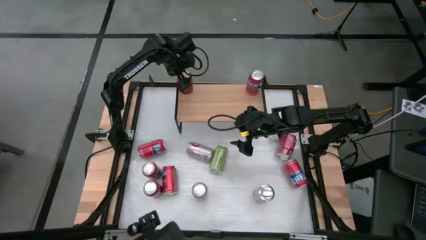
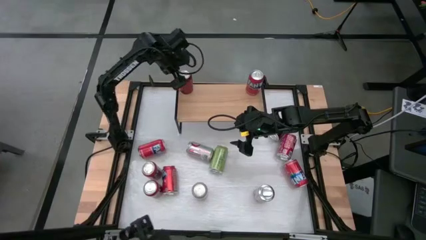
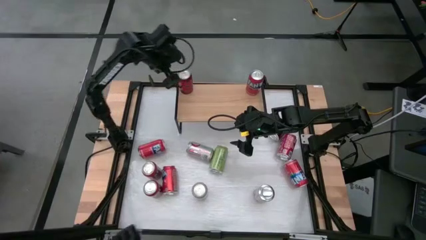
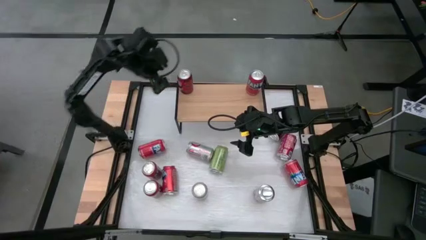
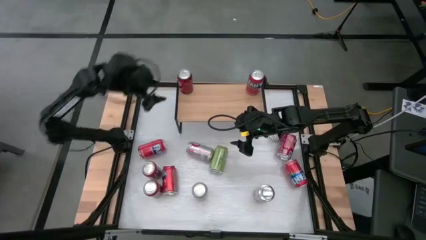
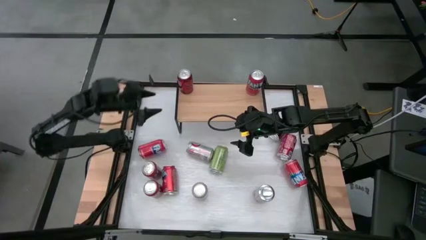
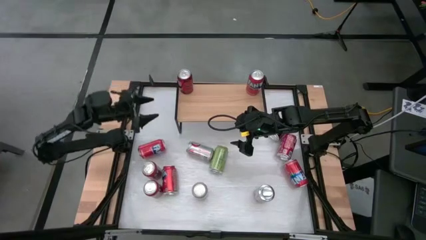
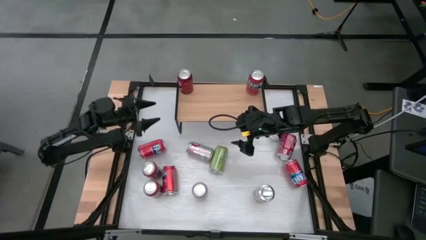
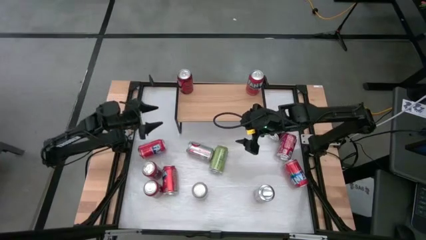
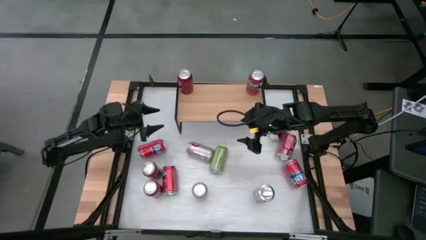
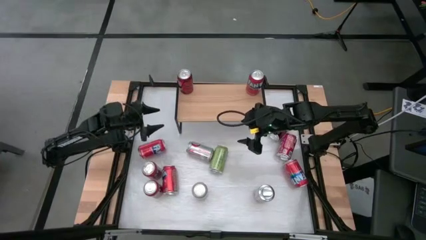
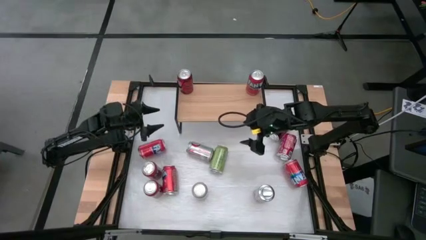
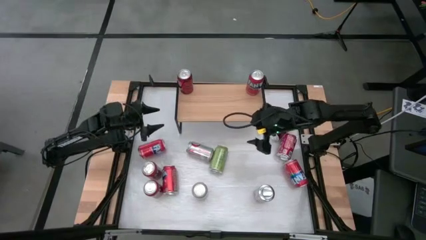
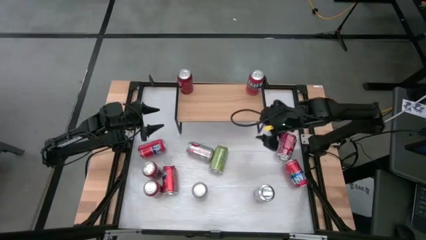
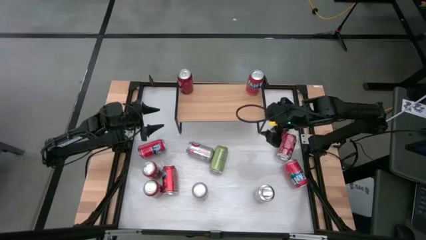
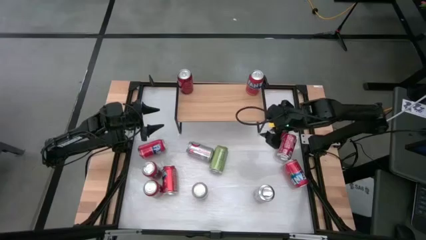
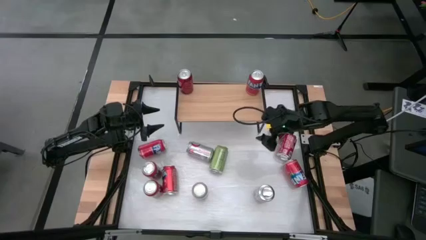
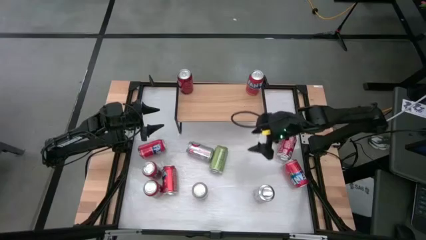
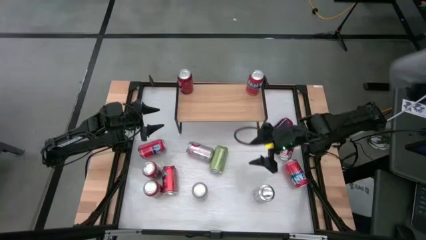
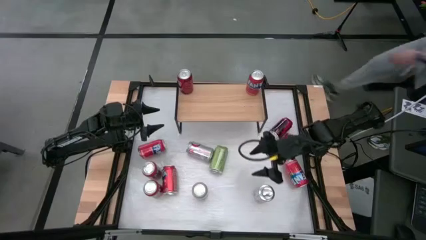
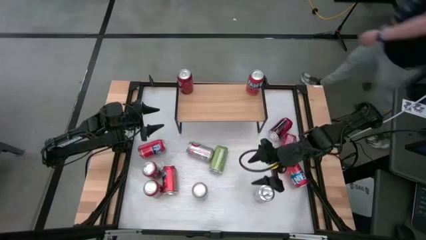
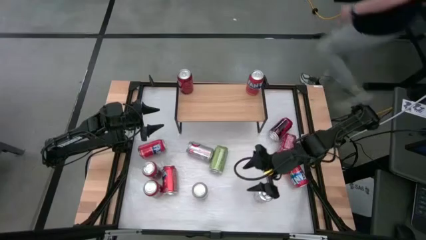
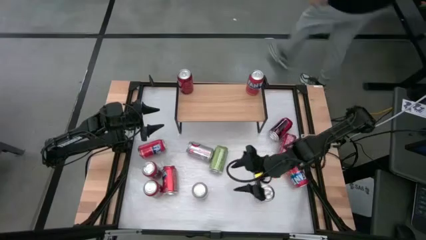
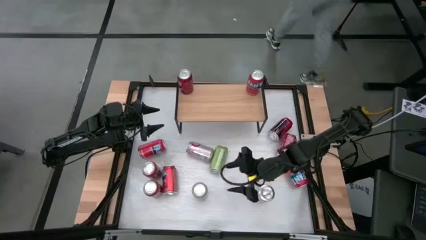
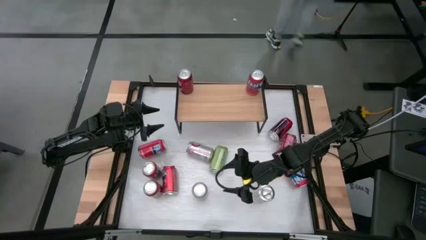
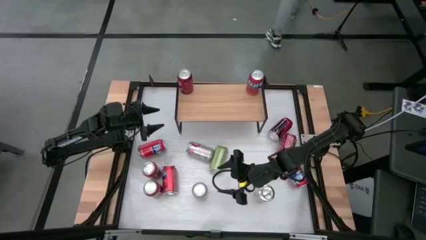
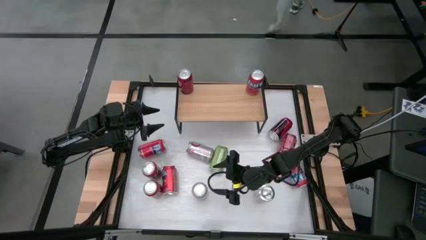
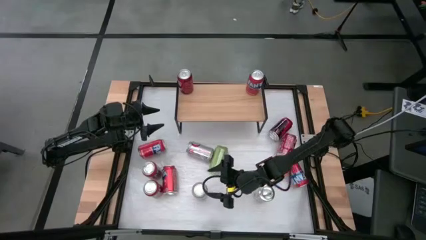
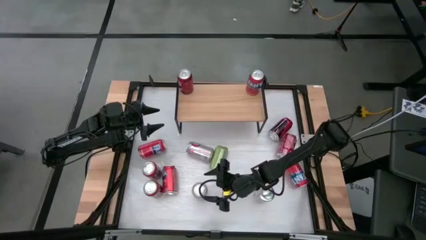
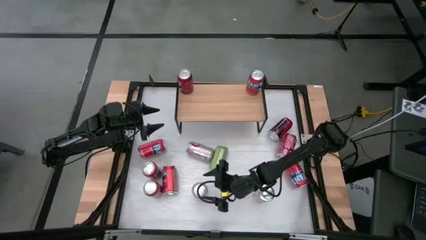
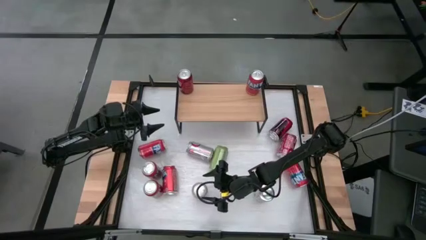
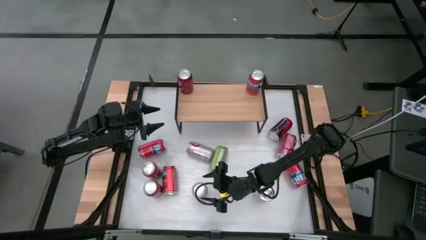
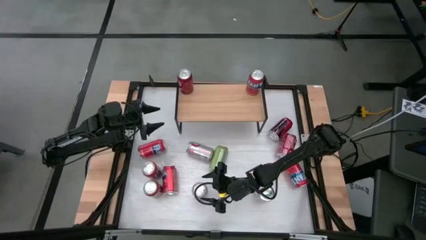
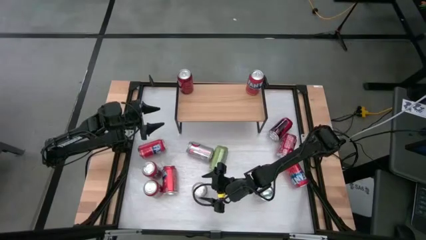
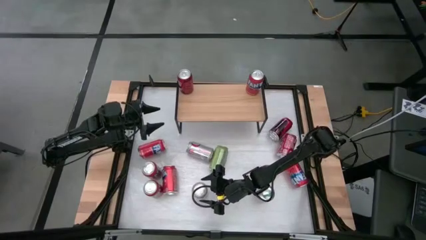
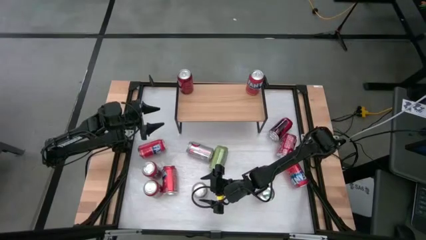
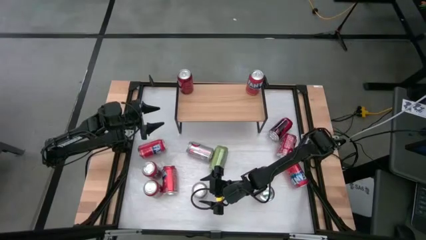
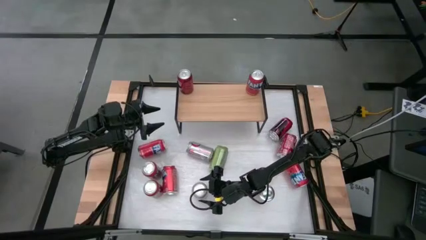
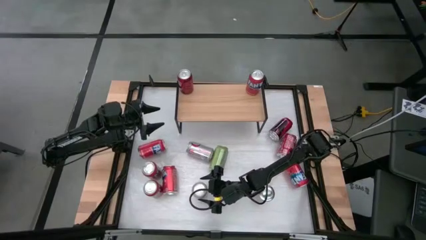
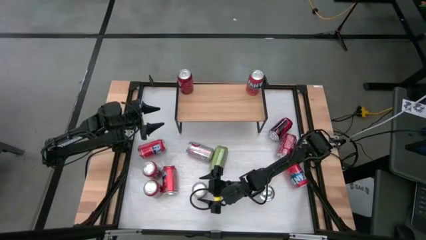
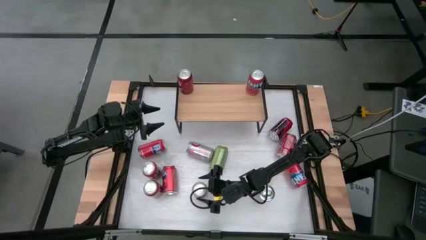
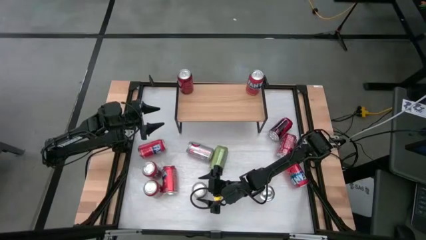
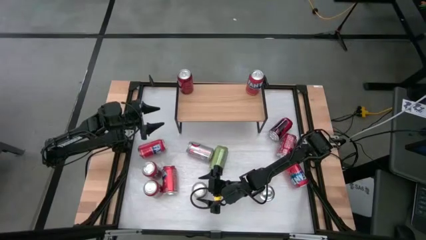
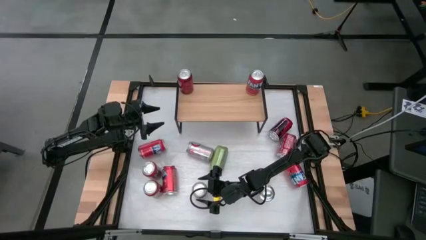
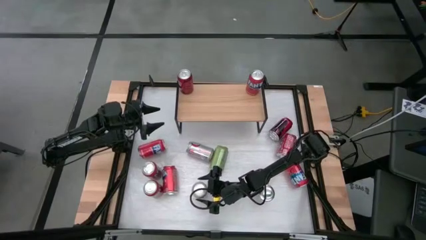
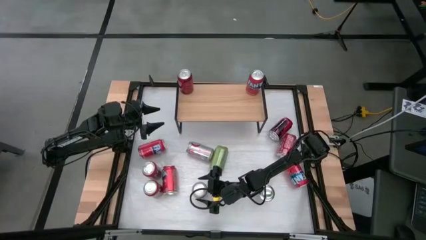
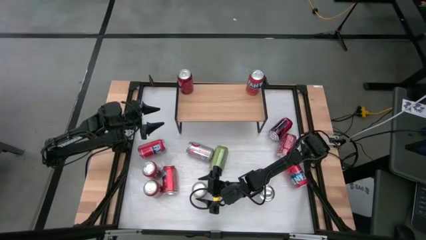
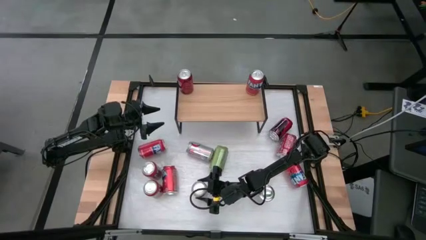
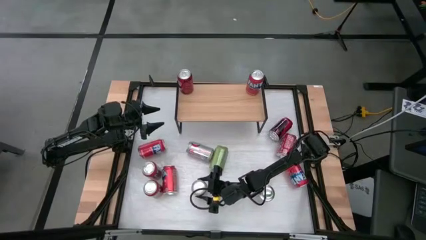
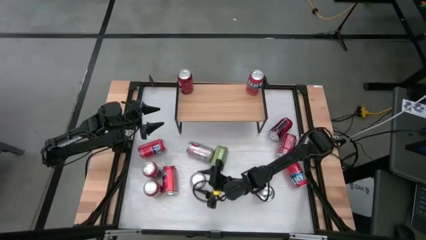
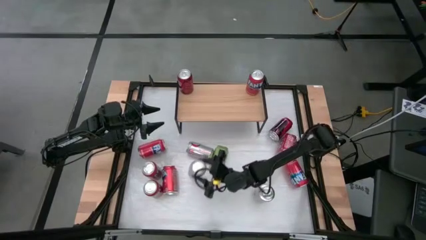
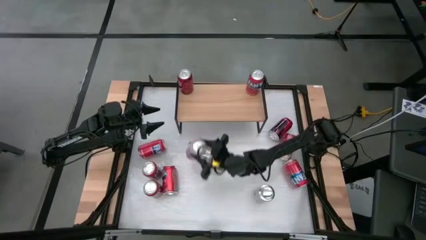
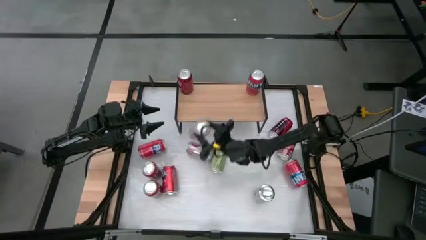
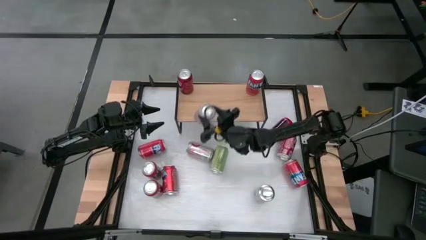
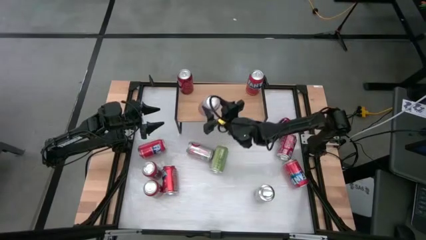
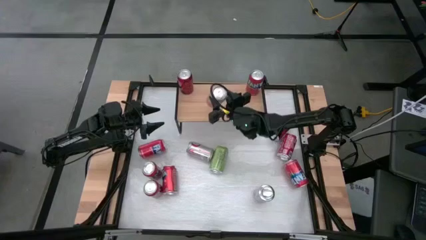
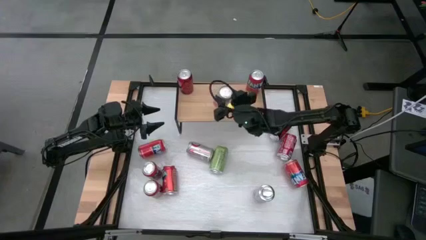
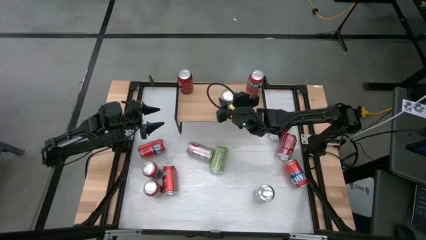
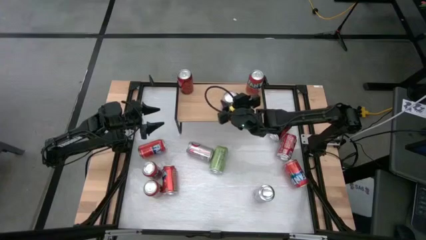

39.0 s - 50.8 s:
Task: Place canned beverage on shelf
Put the orange white soda can on the shelf
